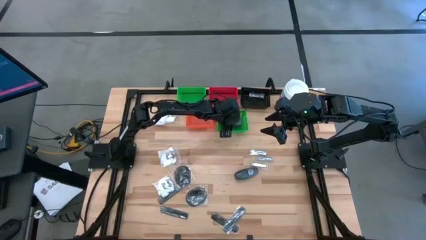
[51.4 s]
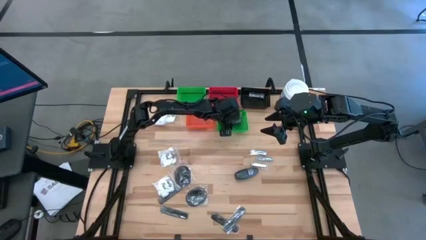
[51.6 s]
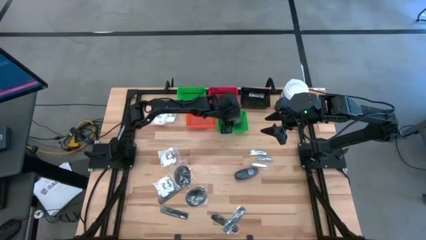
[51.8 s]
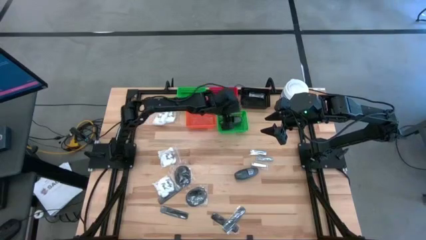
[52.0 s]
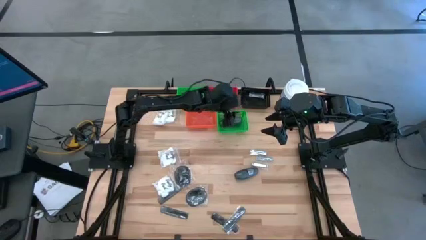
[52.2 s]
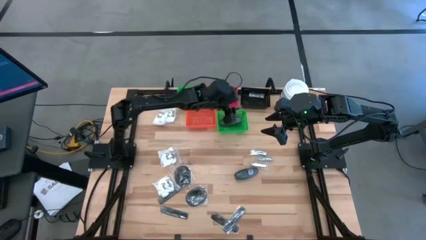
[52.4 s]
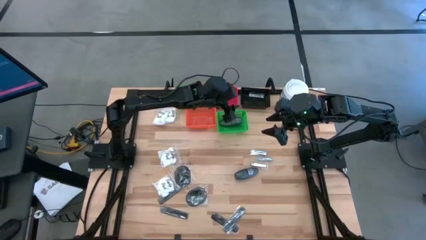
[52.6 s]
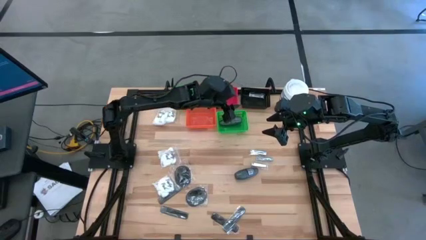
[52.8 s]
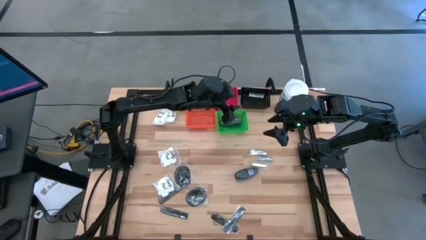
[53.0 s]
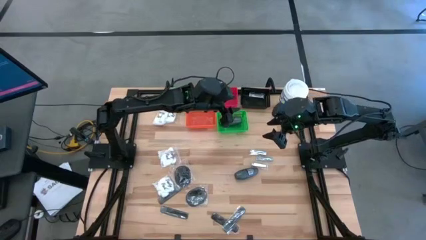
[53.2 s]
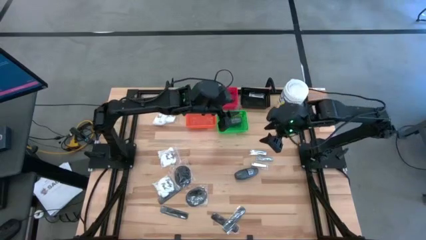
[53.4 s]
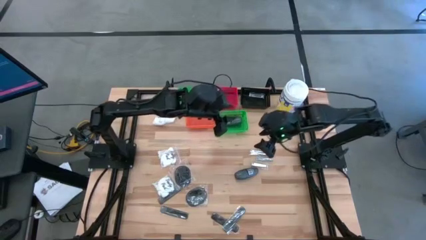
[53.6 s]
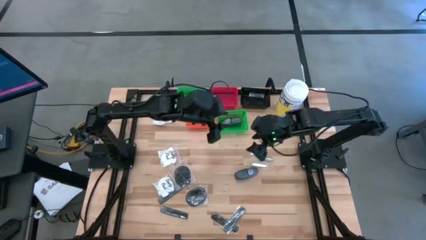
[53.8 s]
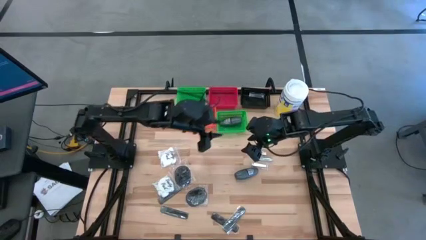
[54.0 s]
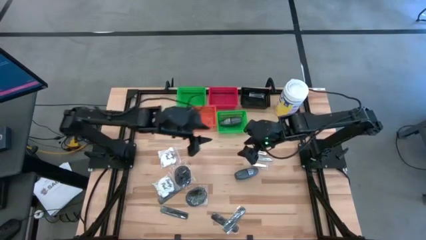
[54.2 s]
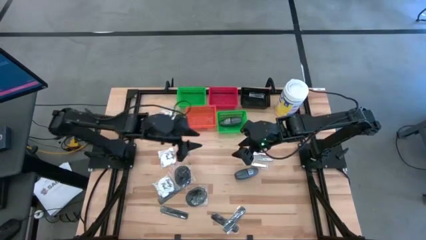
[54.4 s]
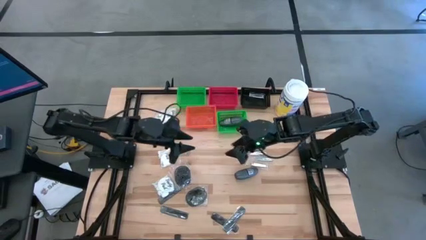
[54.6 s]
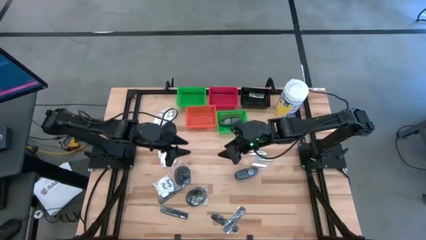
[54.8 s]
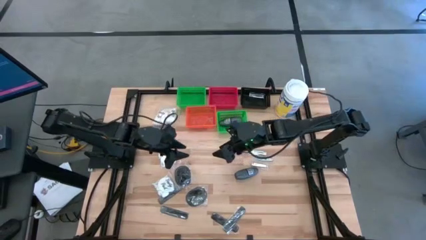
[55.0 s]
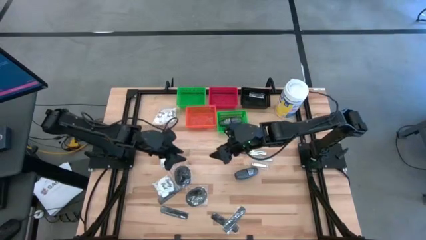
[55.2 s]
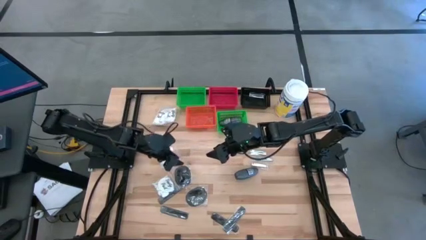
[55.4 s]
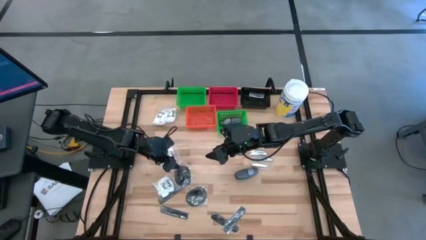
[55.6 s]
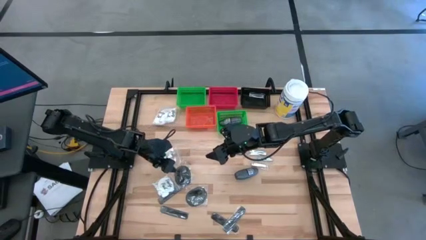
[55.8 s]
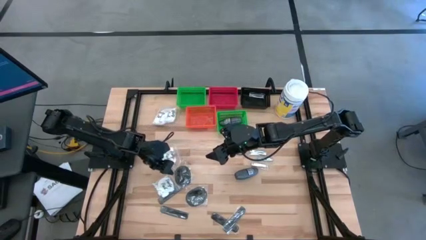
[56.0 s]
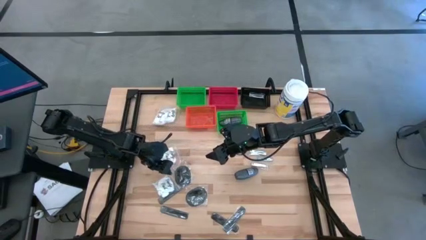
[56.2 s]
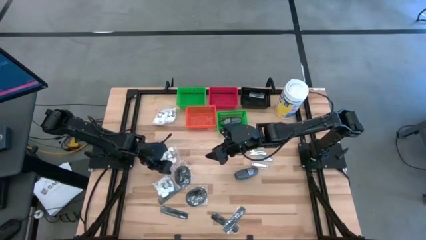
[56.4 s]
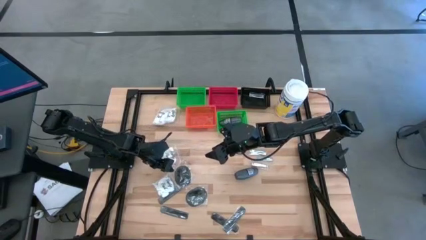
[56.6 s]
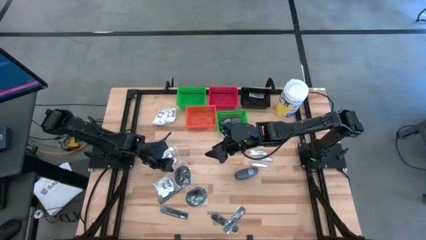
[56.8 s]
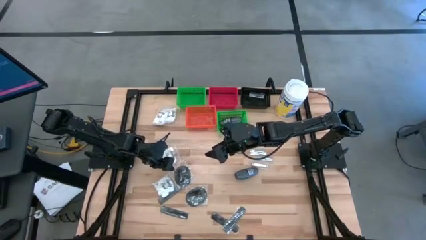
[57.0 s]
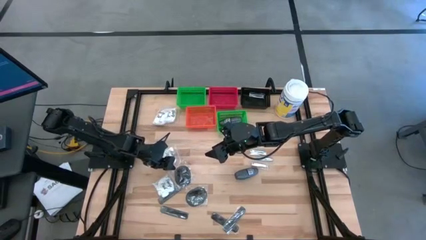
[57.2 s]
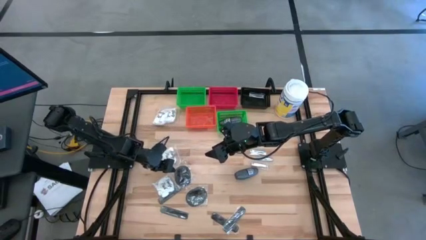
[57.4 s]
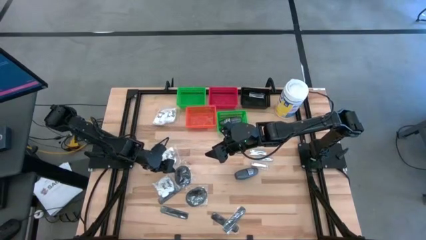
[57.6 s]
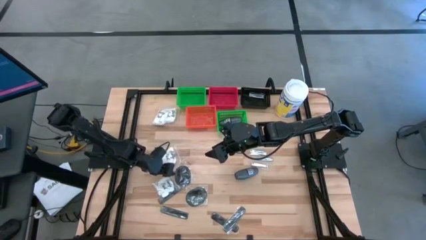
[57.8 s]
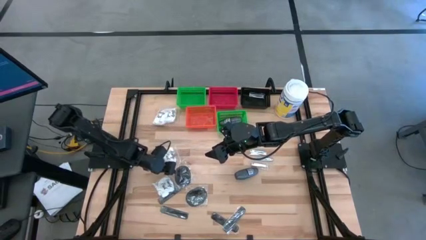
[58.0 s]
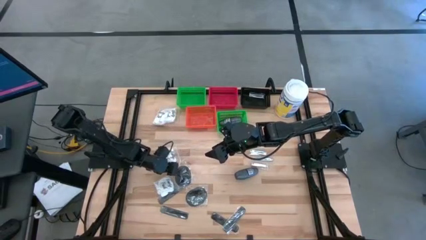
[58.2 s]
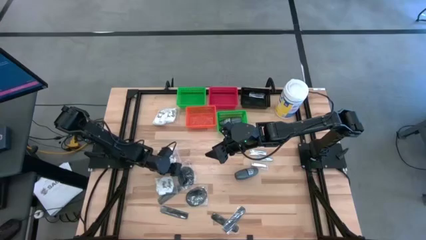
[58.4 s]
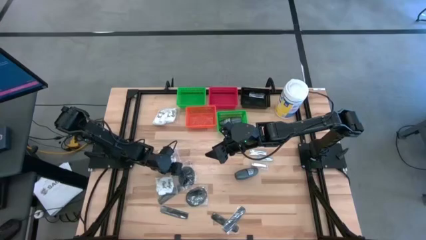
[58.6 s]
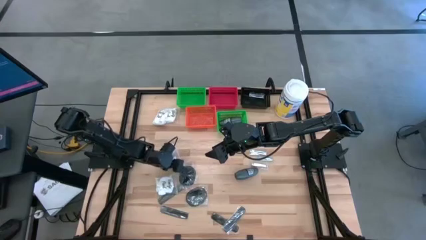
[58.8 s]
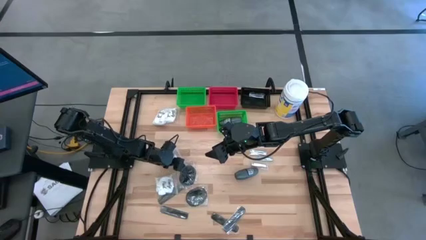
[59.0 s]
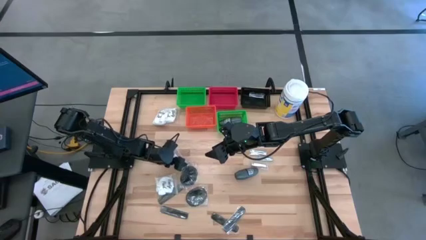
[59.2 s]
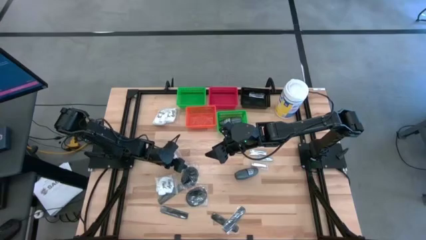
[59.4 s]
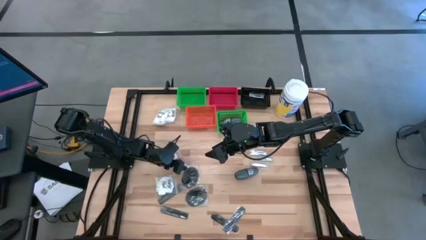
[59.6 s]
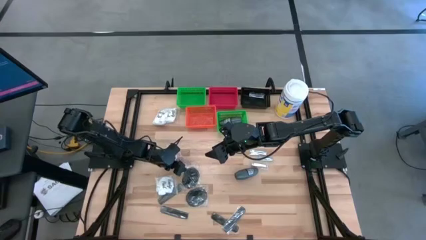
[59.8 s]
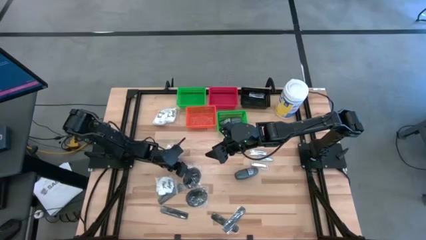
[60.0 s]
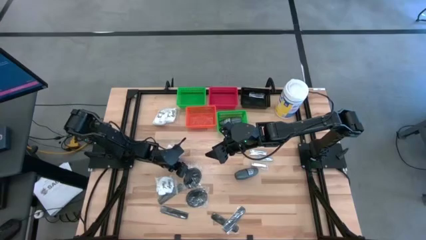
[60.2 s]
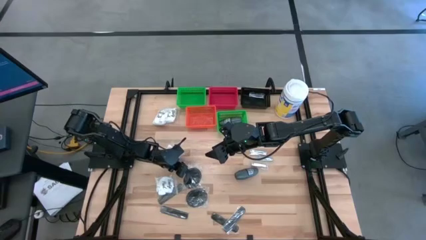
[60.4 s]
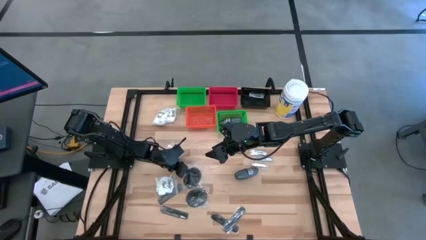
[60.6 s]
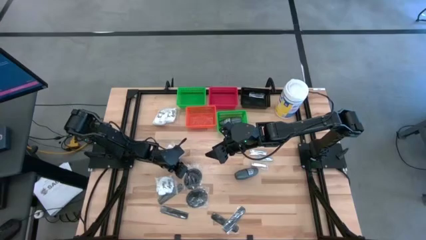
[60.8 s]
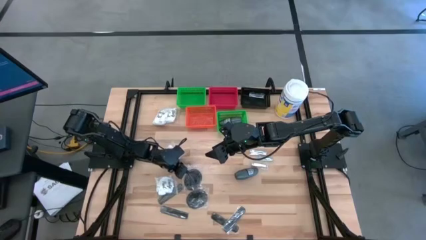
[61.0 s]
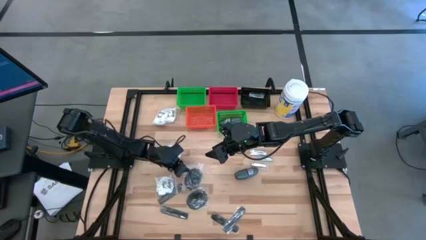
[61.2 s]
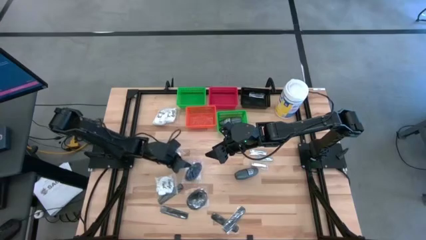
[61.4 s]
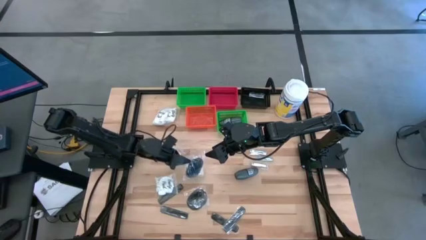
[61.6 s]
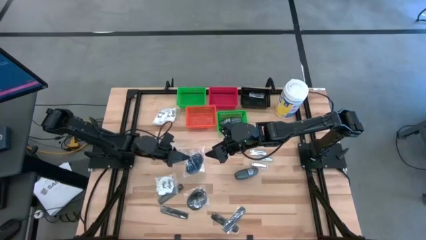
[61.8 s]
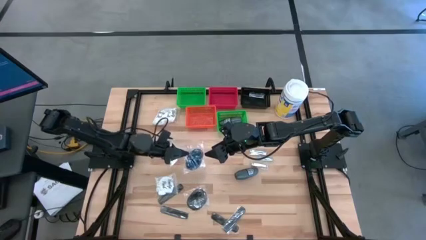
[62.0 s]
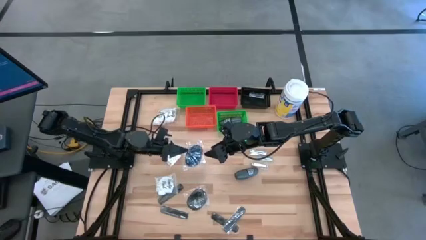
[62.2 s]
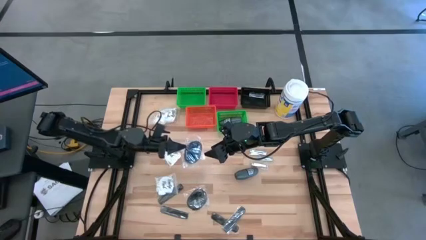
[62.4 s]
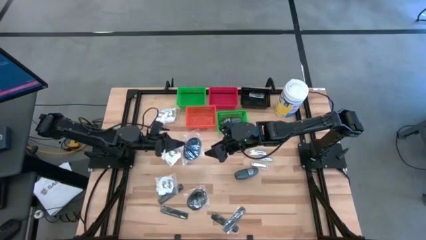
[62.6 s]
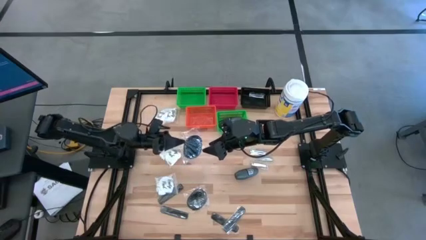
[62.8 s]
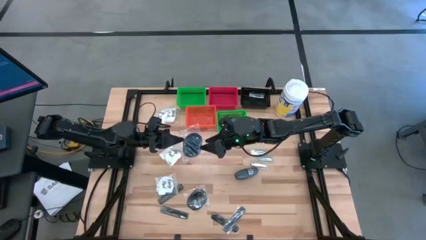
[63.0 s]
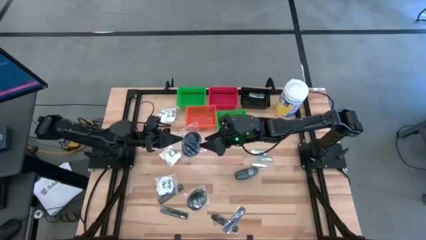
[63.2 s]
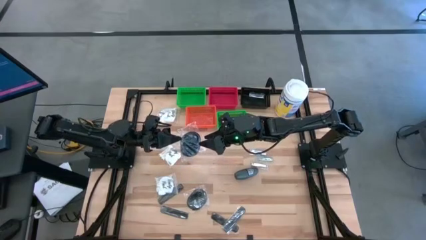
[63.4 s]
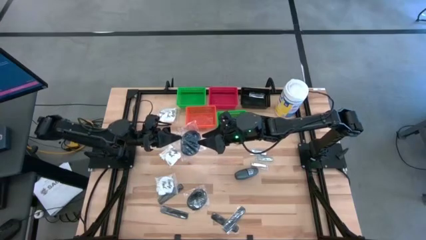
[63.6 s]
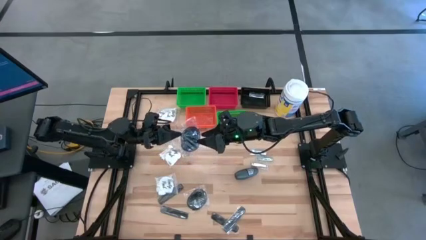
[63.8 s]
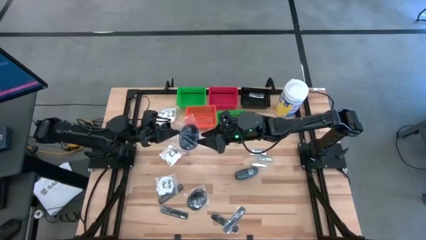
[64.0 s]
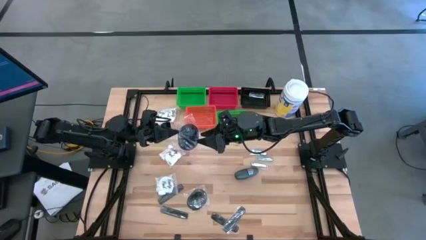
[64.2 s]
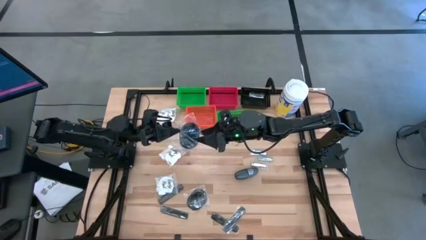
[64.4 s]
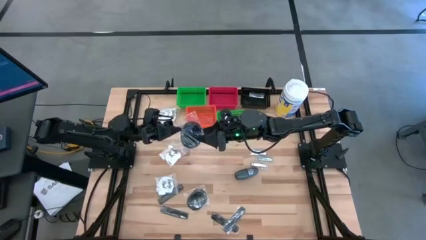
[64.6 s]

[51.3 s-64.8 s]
Task: Pick & Place Travel size toiletries
Put the black hair brush into the orange bin

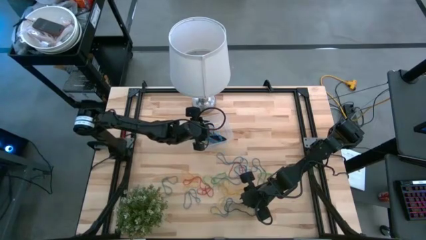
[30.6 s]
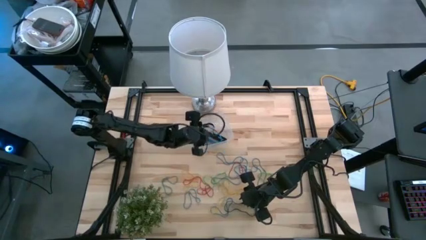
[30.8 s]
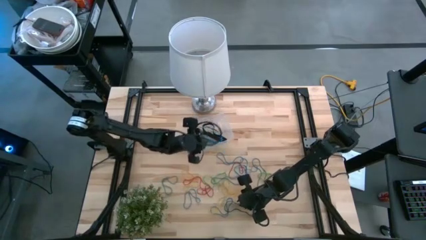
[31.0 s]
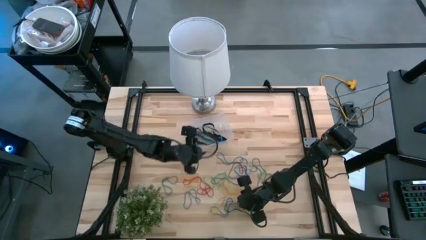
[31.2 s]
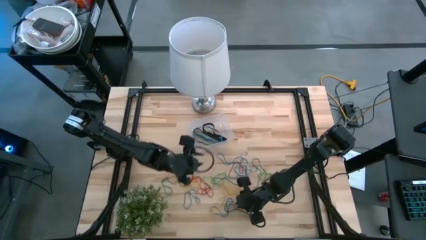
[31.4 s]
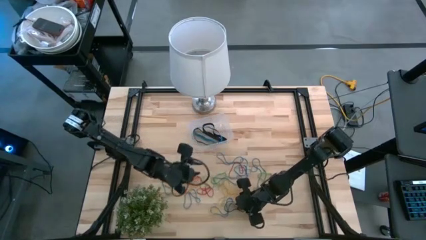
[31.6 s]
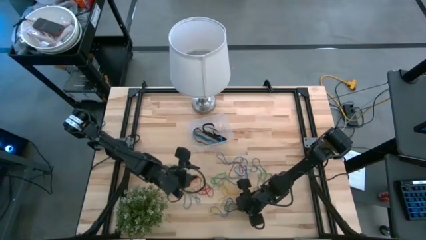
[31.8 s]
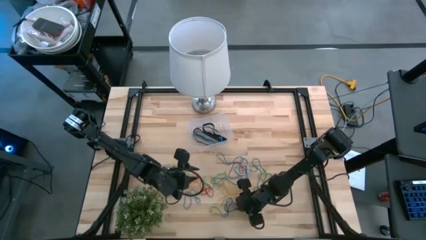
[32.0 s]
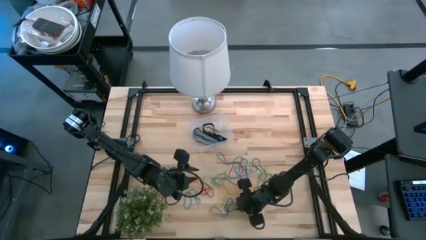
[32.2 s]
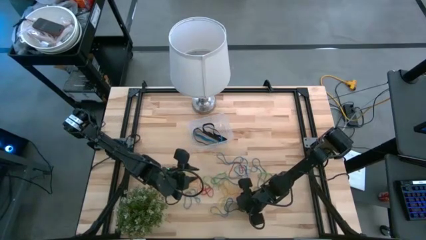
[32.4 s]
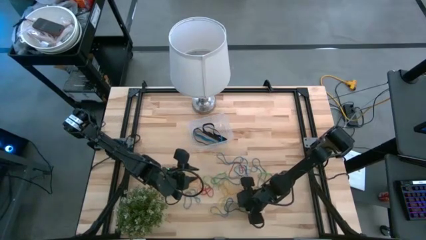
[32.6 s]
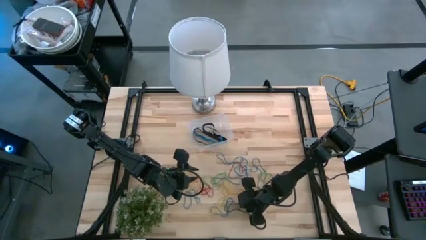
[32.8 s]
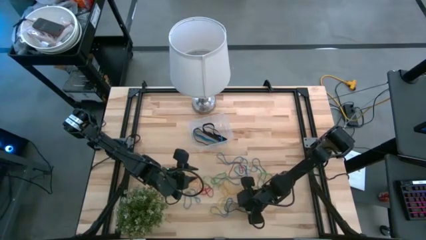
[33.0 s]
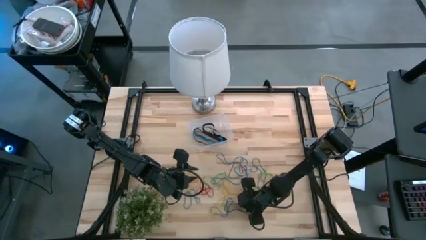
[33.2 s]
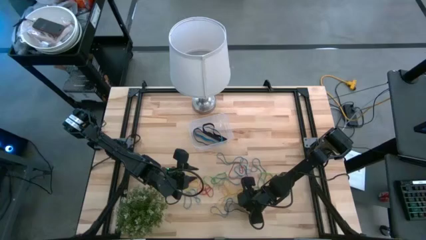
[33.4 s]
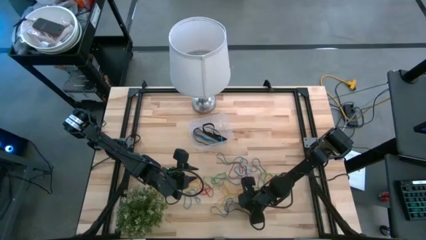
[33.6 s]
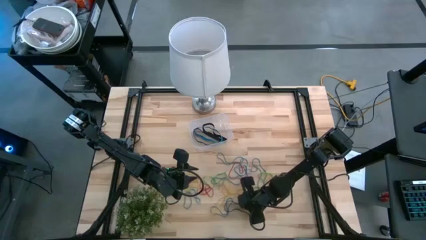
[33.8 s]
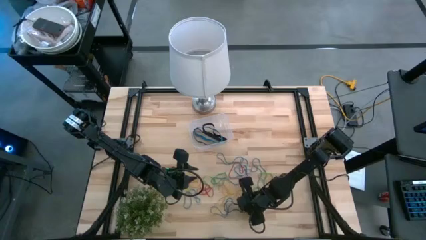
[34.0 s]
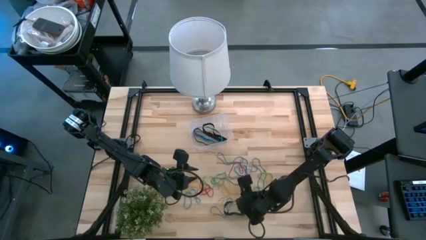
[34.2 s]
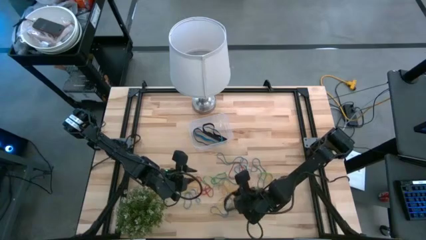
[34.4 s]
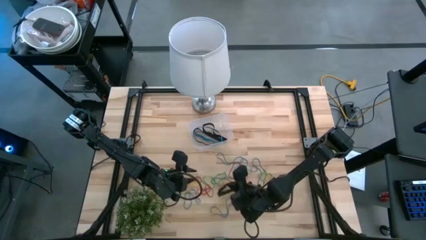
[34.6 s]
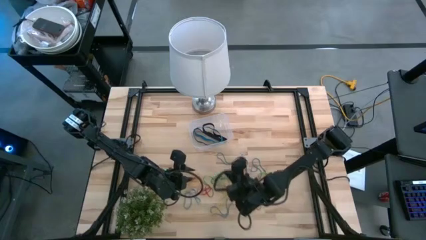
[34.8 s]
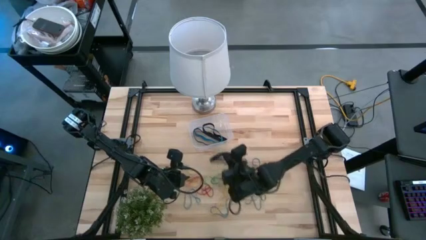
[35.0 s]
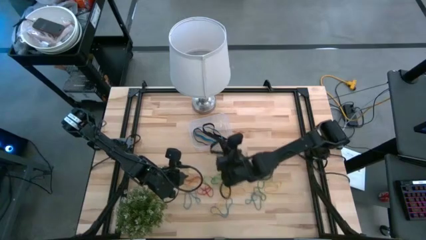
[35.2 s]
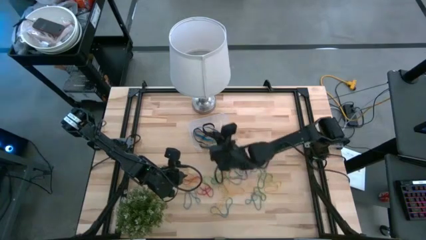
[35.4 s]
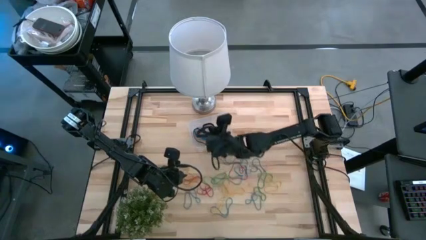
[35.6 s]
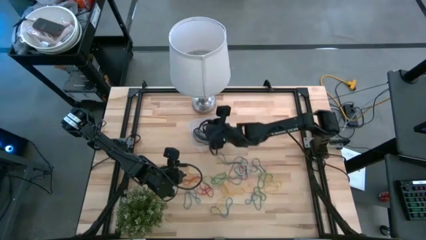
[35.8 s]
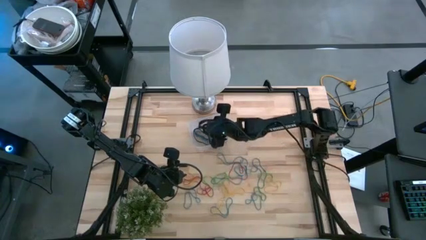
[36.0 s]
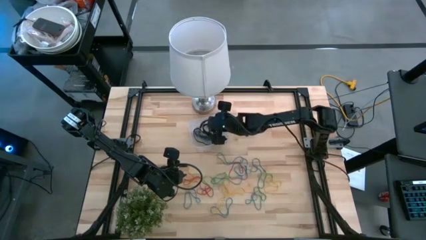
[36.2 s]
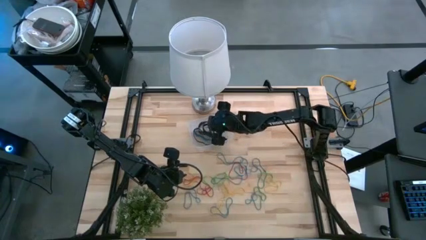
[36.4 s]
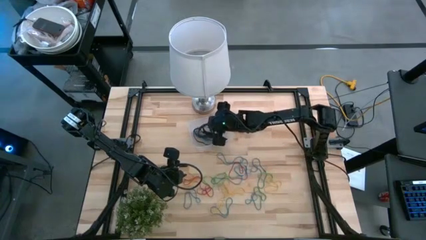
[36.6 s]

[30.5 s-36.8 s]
Task: Pick and place rubber bands into bin
Put the black rubber band into the transparent container
